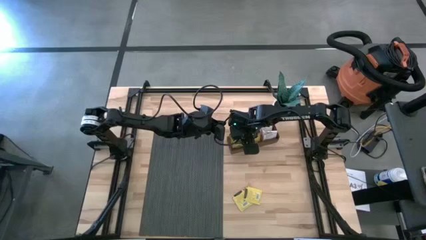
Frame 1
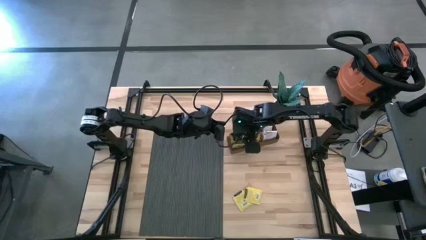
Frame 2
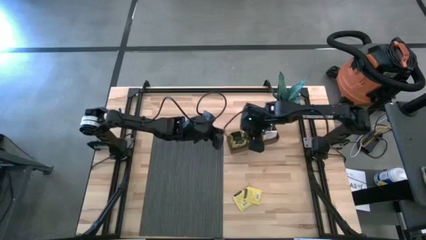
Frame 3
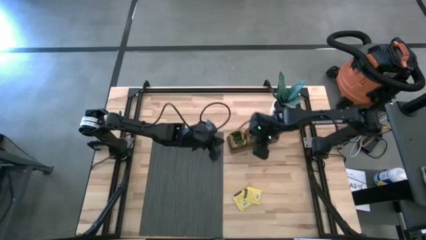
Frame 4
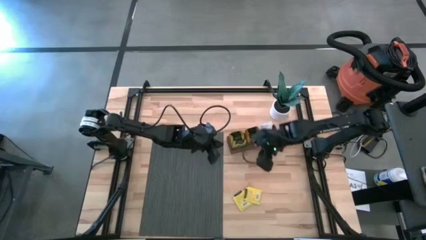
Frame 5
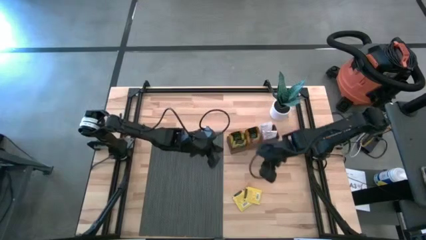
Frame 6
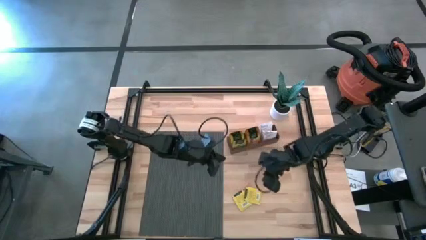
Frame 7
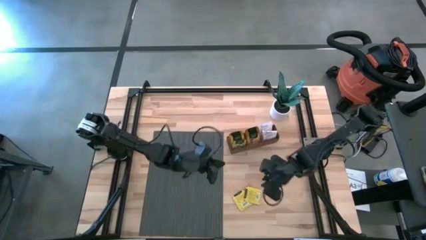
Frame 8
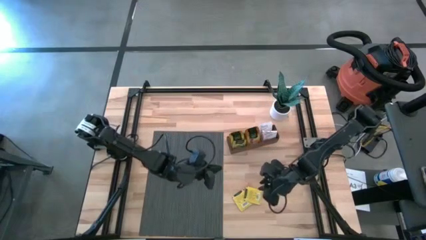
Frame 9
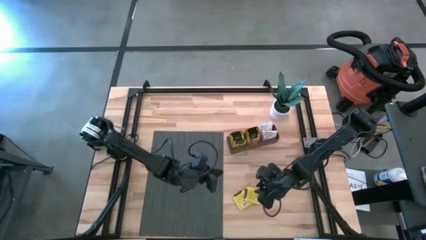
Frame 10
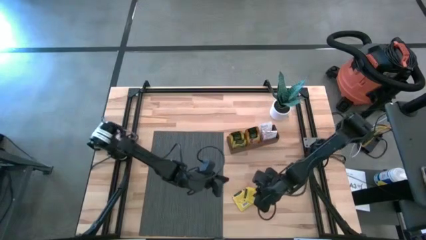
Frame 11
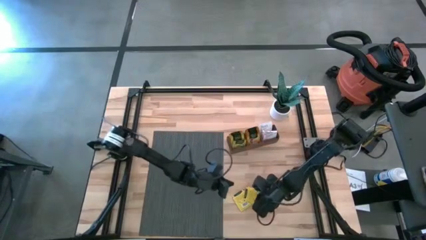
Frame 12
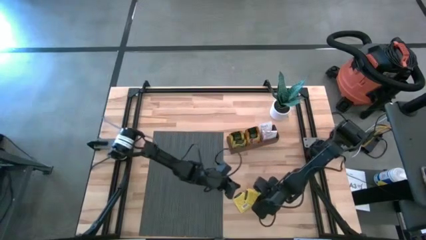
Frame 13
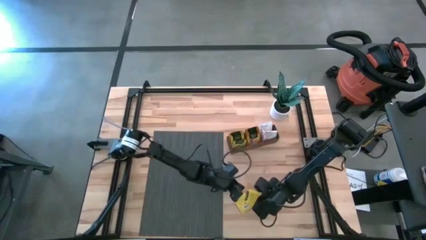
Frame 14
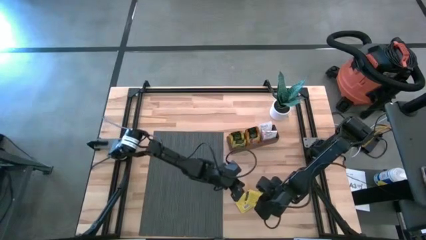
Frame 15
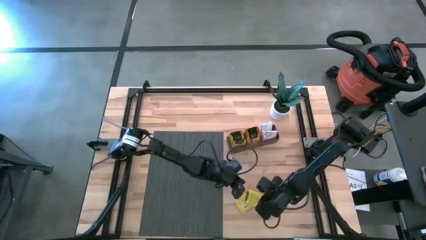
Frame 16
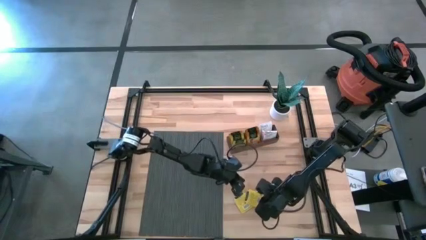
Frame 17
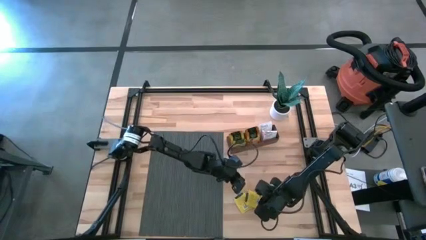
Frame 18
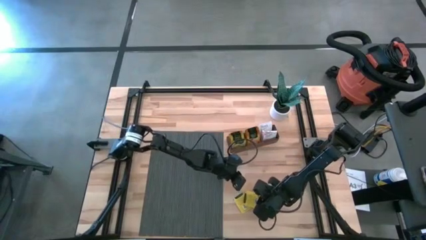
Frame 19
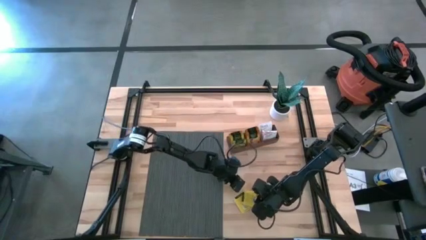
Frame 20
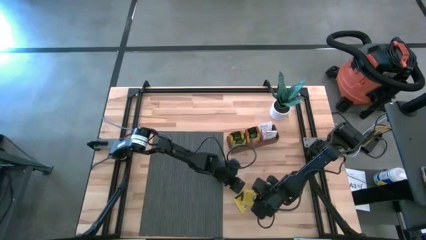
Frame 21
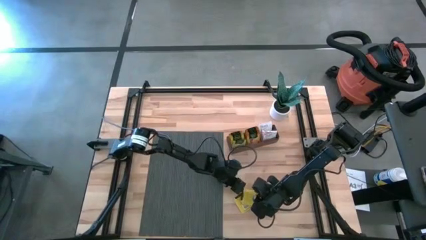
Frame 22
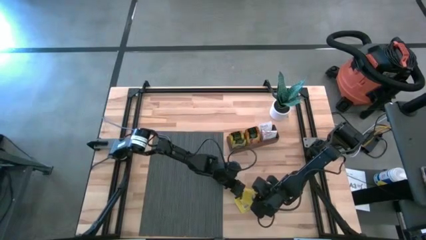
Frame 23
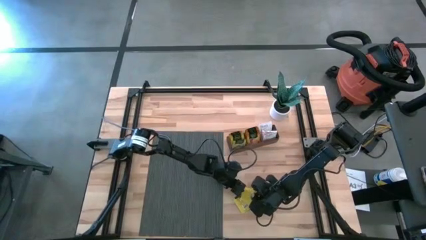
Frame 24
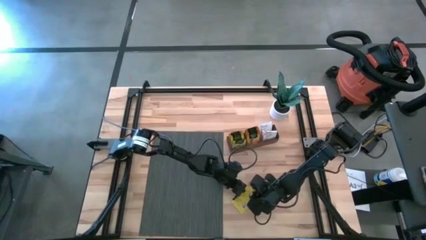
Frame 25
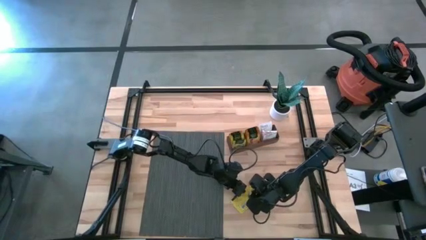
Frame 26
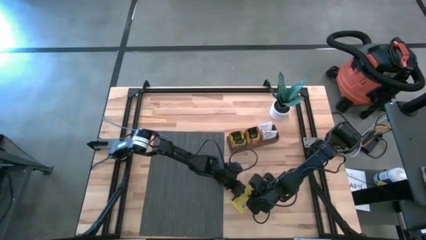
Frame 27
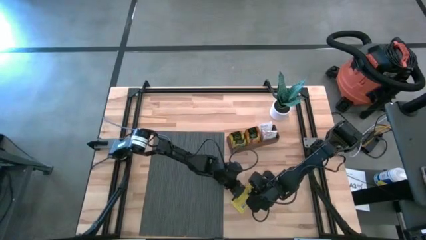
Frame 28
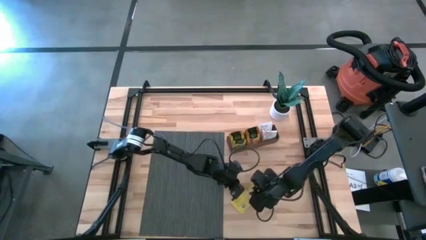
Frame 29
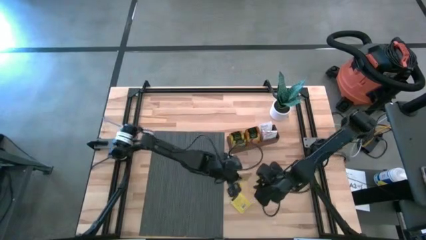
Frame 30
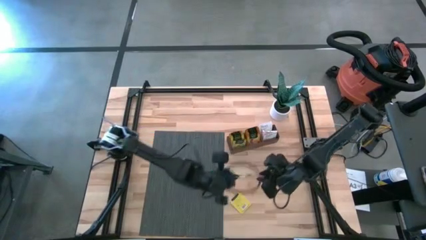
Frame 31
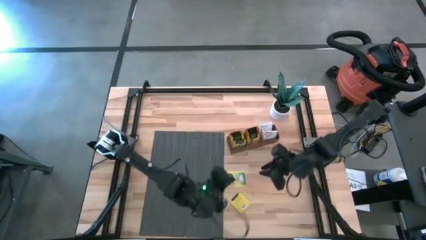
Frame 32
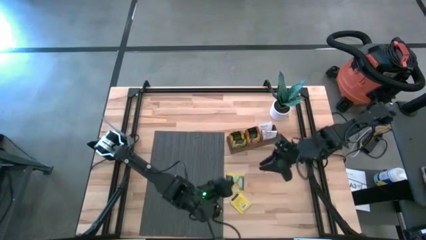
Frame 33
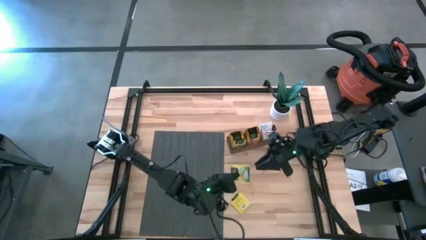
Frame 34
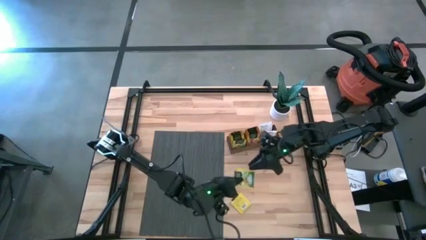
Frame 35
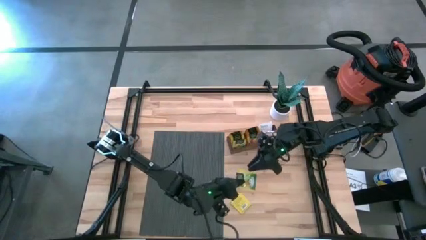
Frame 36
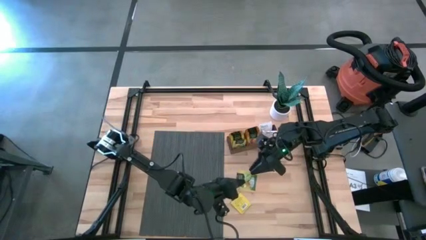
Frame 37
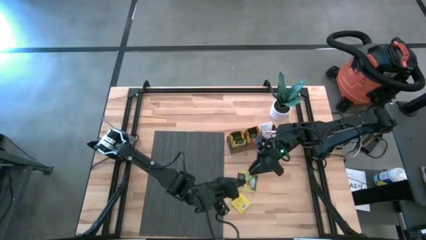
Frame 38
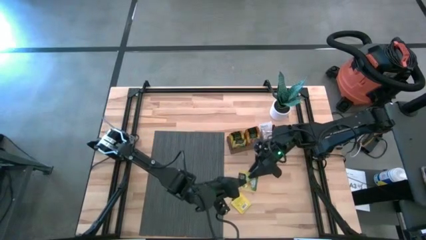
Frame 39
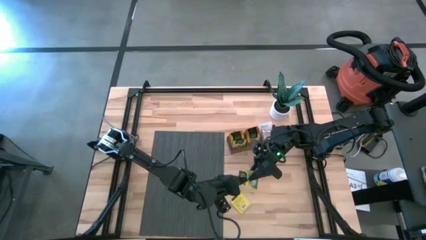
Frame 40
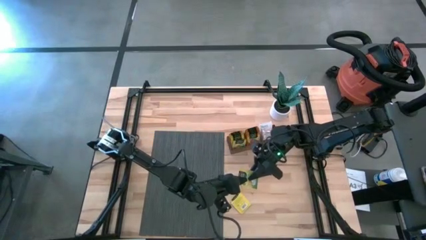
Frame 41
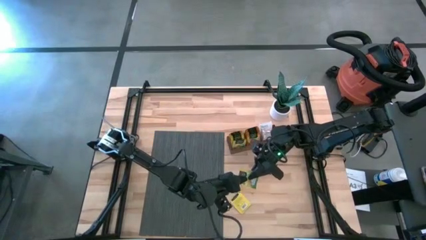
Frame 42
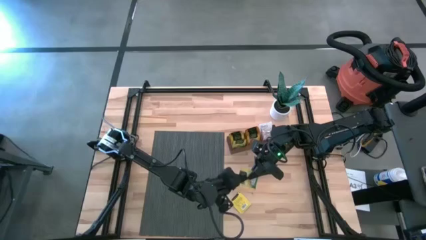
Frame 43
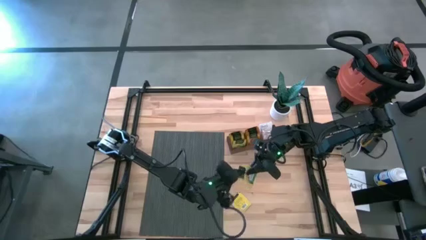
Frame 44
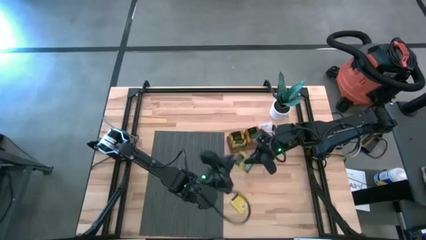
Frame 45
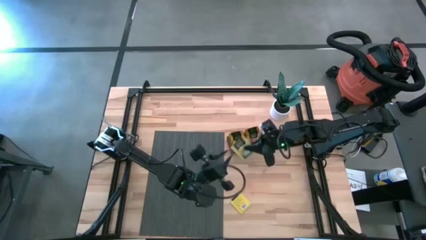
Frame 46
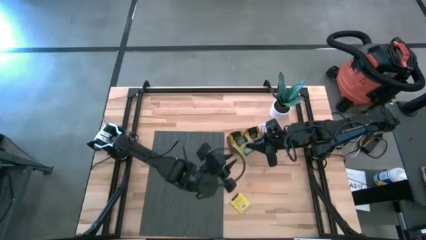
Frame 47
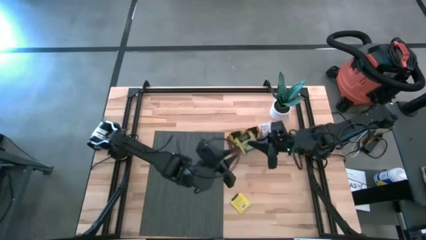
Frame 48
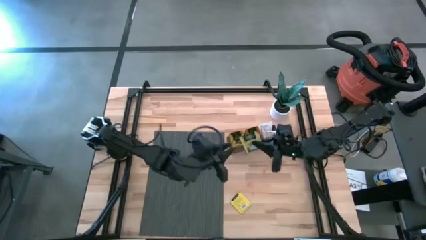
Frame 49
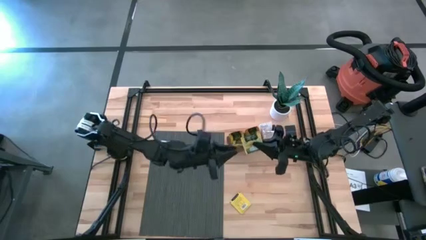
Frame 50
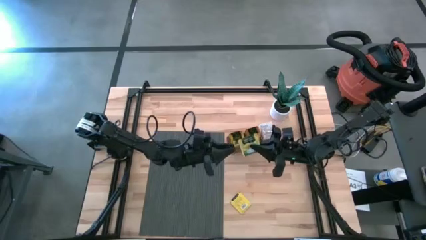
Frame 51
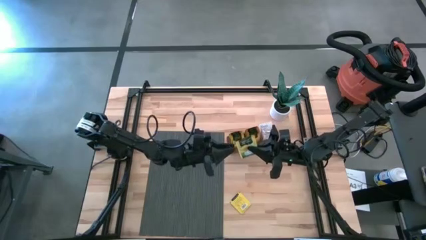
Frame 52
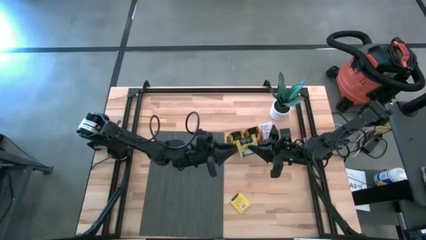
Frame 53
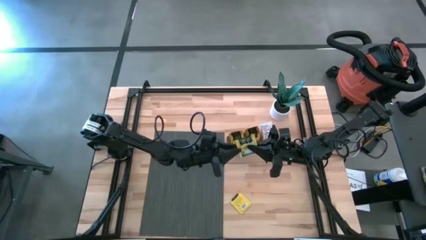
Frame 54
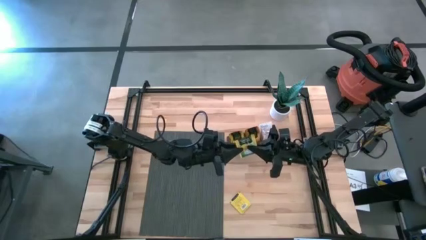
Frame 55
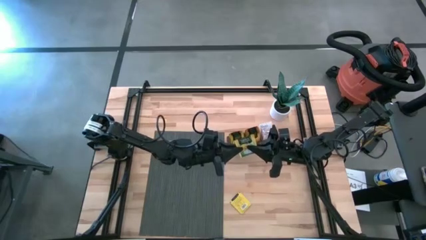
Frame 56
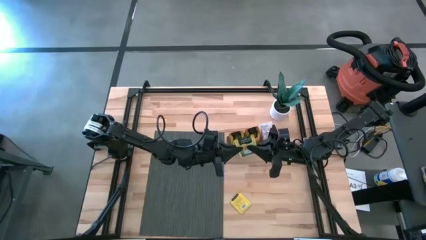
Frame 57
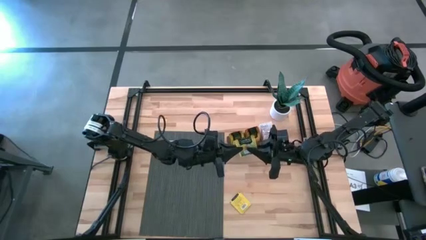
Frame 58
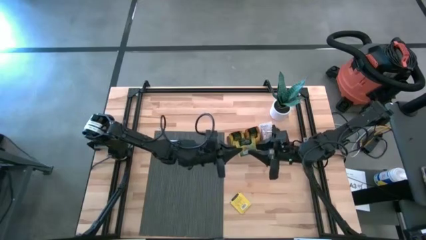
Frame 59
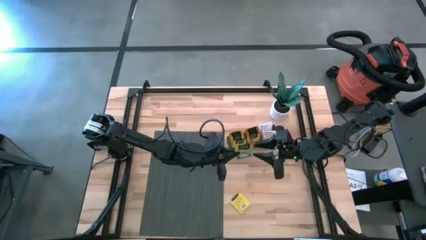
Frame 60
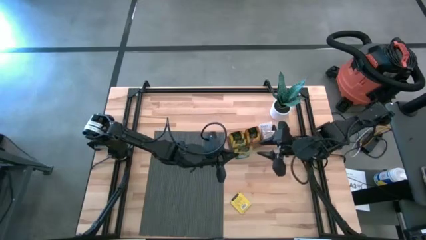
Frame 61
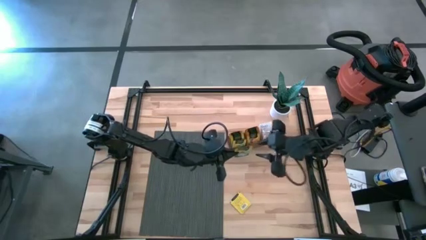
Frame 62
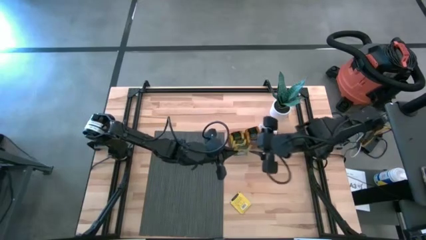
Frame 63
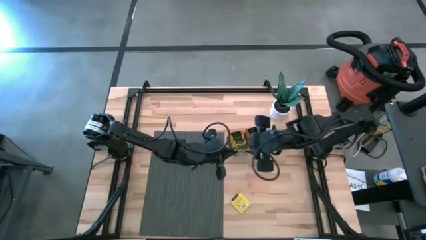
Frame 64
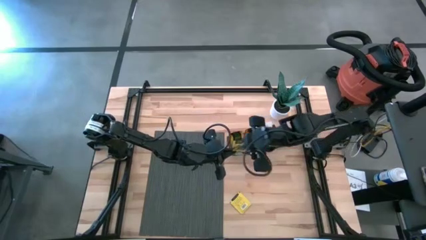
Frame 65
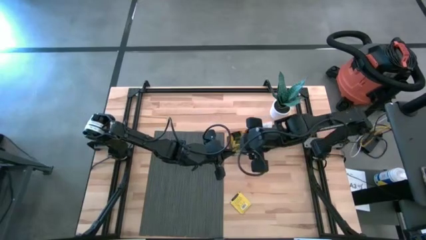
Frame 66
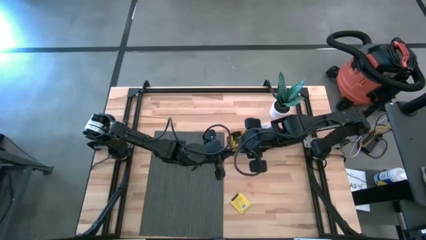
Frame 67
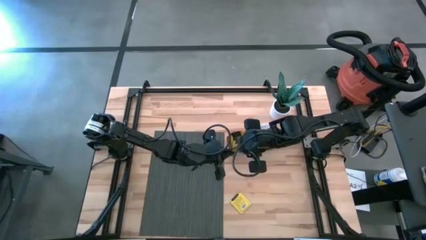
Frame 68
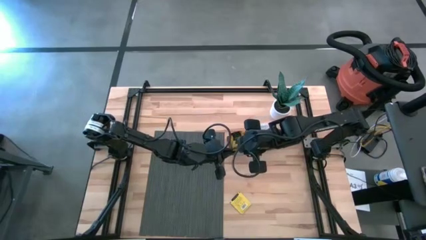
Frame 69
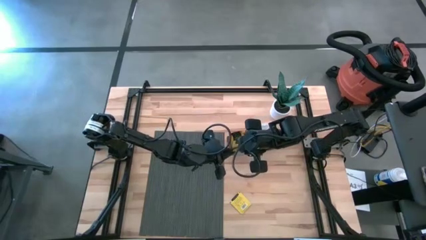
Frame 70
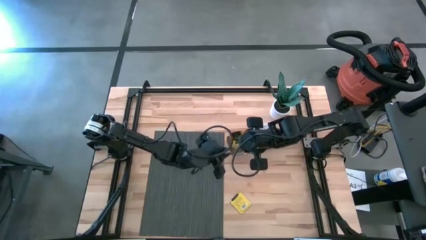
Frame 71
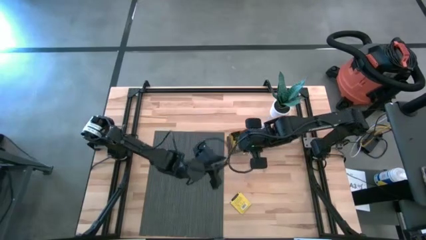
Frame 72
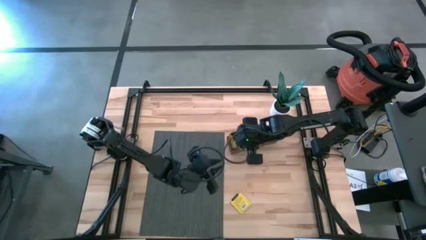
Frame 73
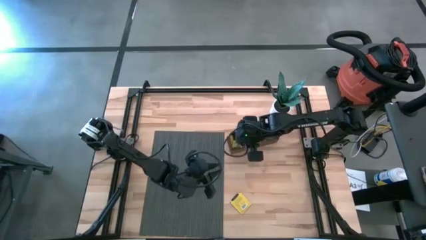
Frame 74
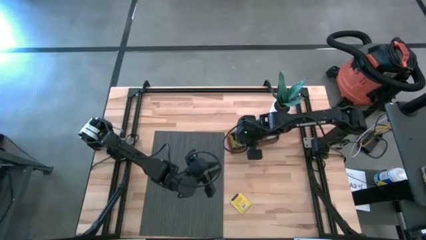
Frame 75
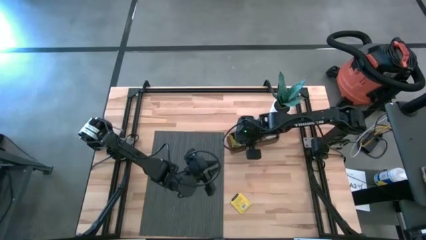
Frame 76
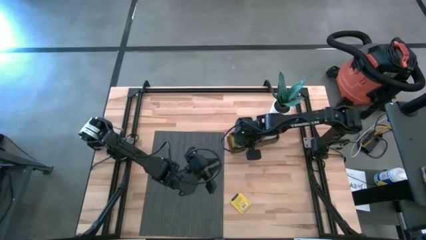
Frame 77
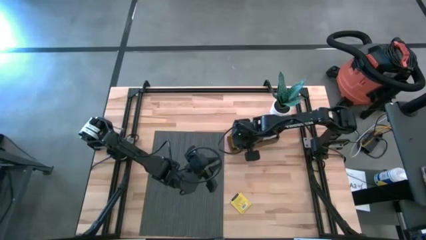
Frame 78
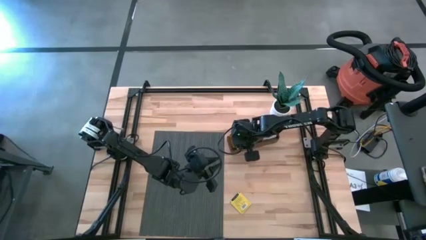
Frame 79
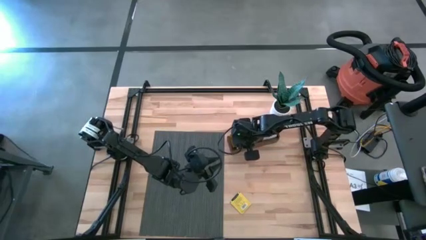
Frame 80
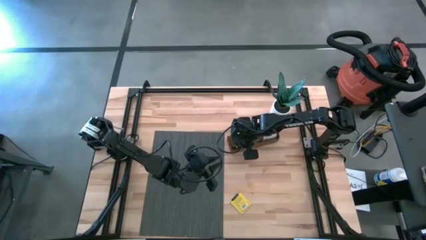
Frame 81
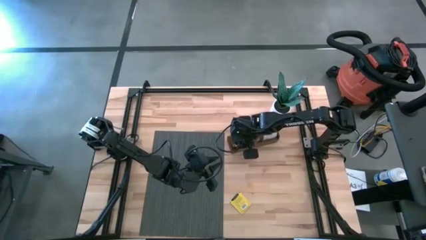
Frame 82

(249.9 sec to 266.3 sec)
Task: Pick & Place Tea
Put the yellow tea bag into the middle section of the wooden organizer
